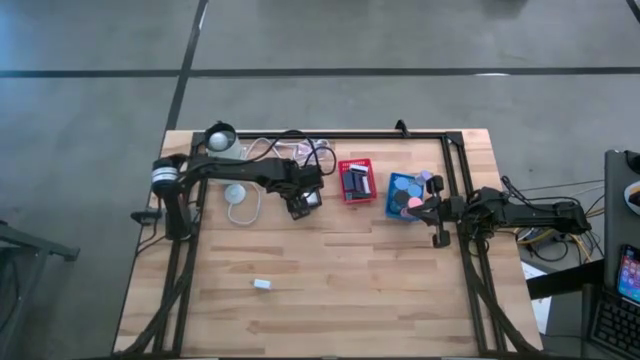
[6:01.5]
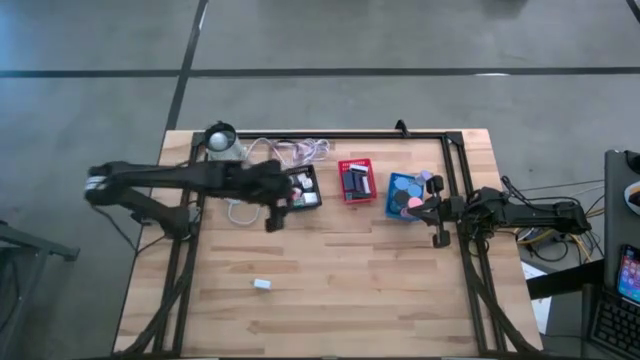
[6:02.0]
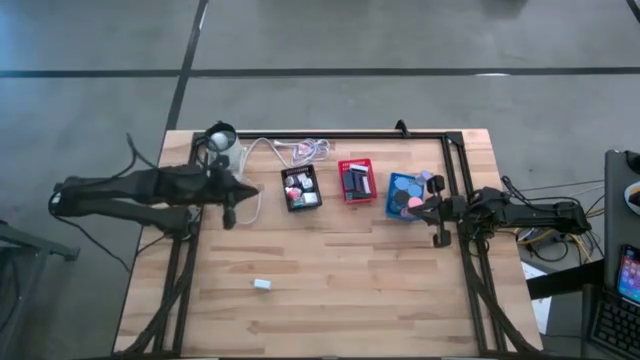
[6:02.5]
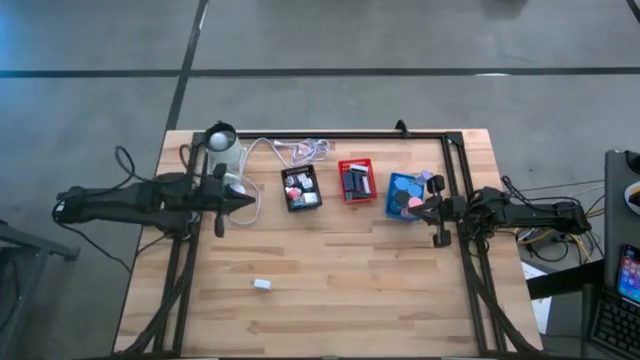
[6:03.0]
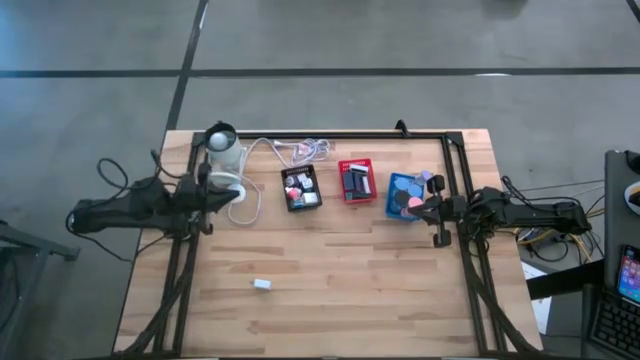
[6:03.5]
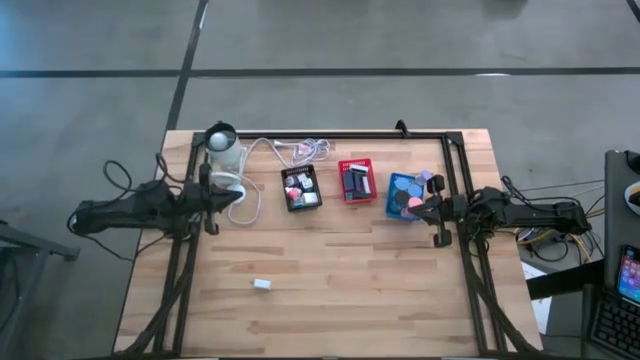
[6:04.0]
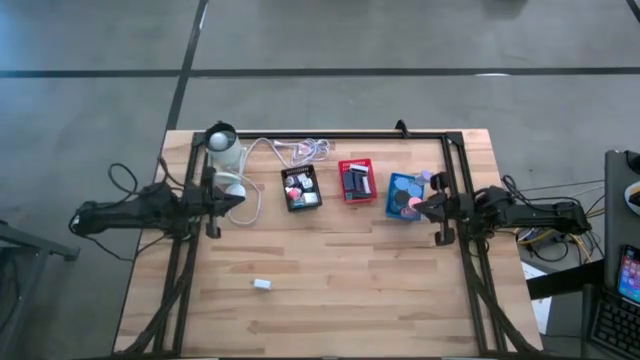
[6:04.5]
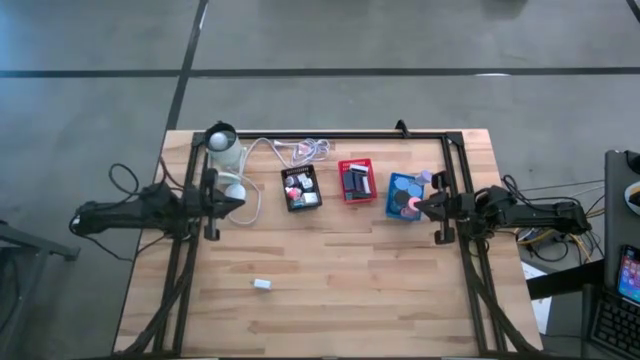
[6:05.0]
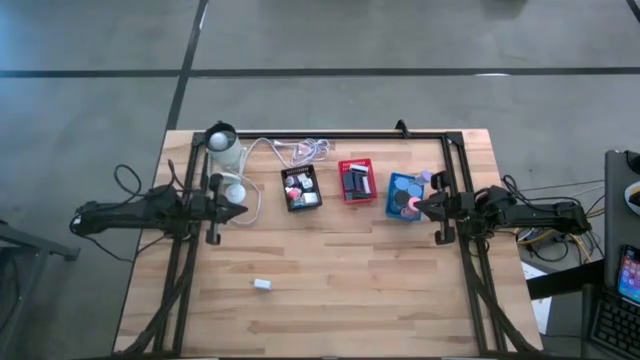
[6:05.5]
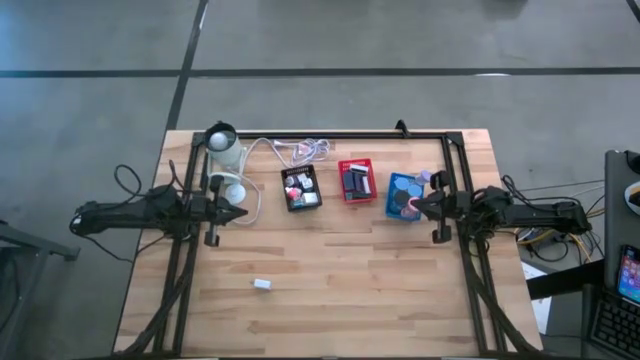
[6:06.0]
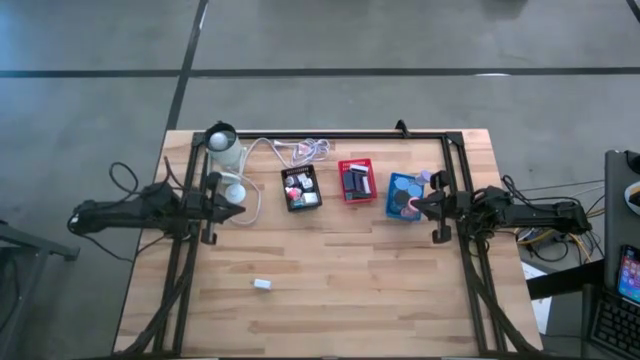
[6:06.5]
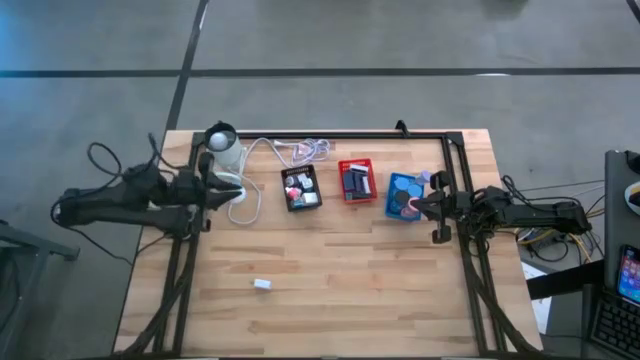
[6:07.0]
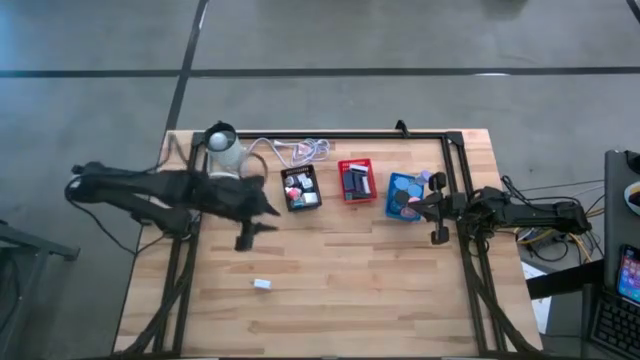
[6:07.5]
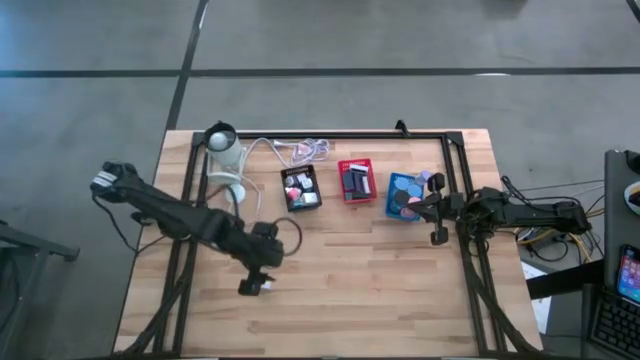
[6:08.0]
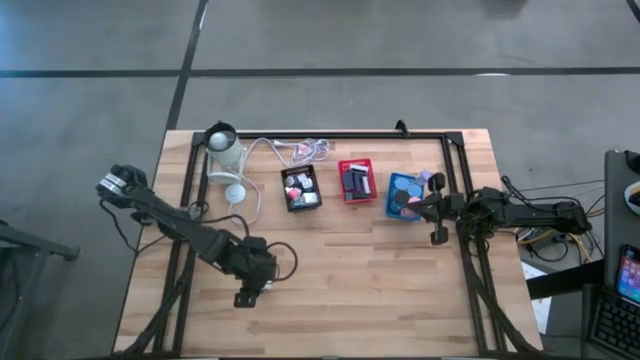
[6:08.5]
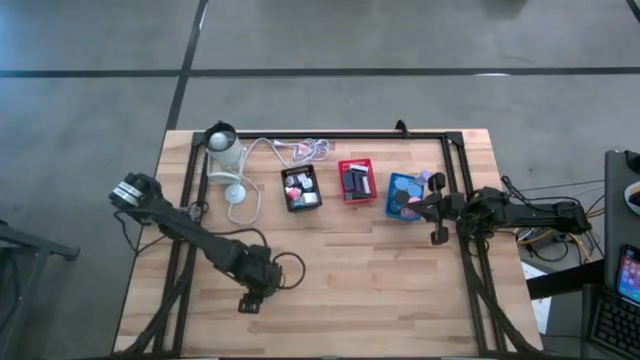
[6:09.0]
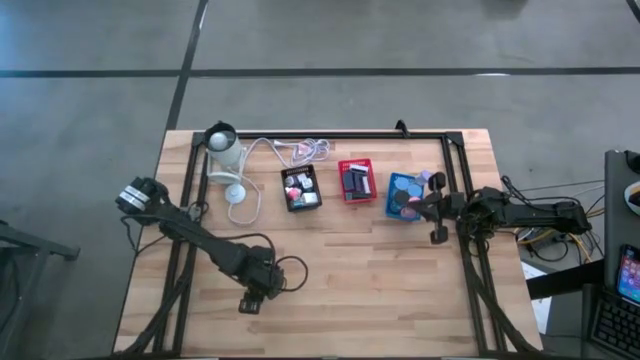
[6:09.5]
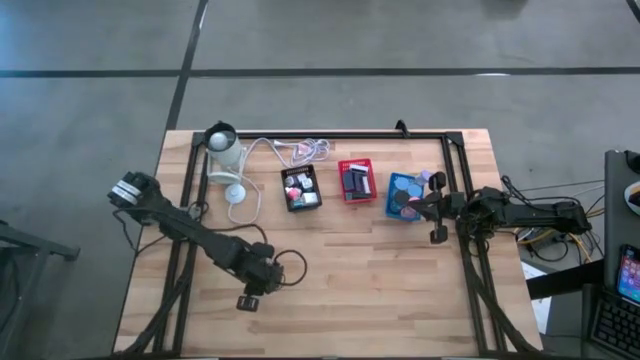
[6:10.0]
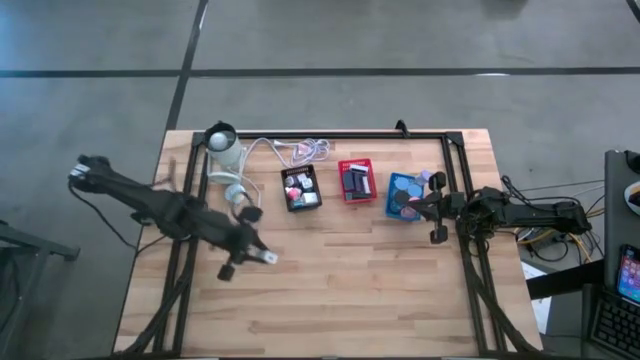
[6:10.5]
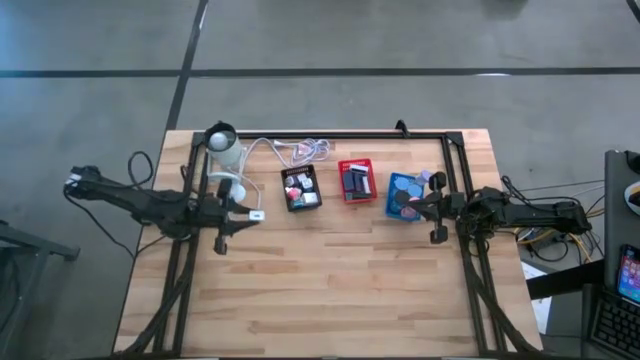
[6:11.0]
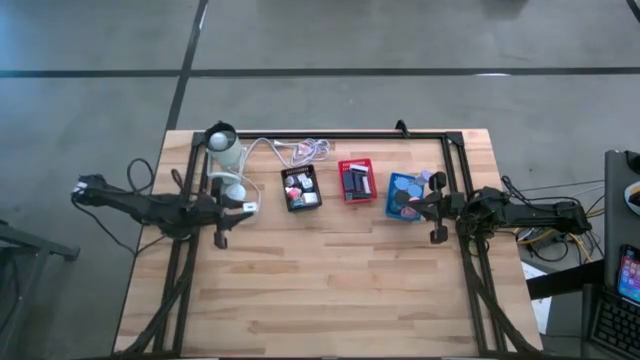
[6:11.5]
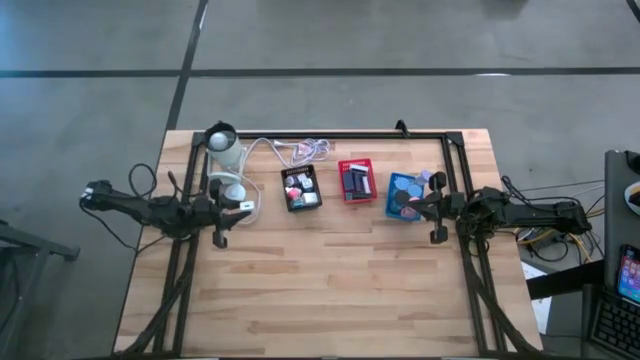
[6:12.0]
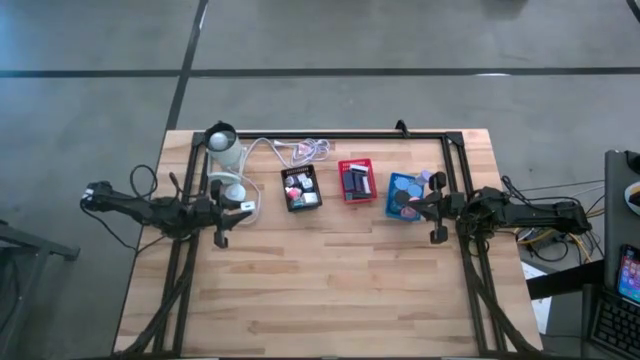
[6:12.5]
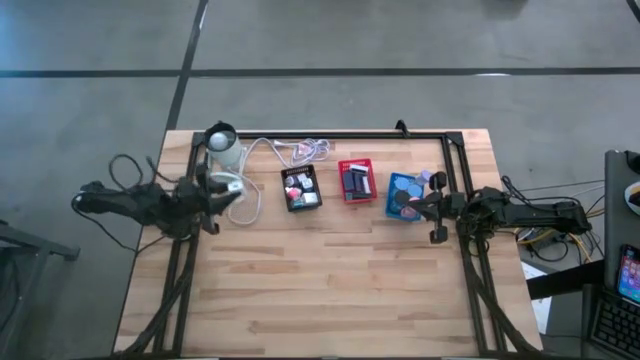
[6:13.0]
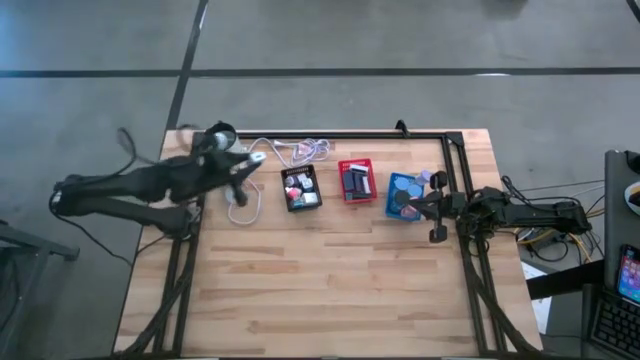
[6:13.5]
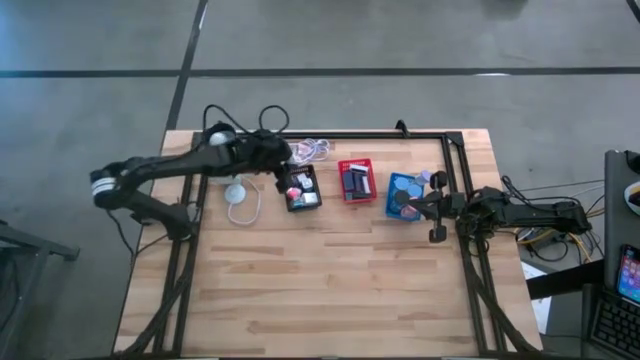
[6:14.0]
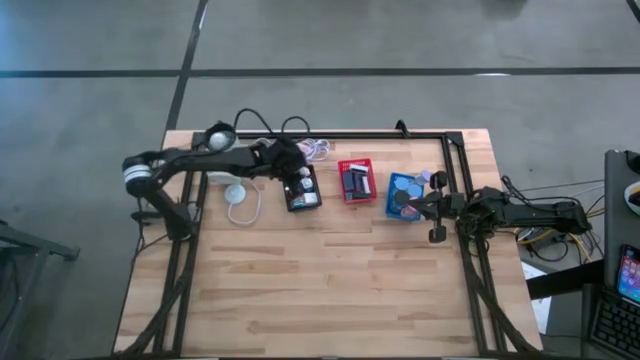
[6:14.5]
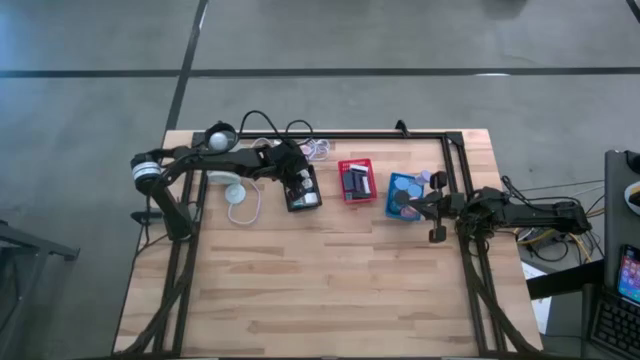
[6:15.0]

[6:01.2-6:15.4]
Task: Pick & Place Office items
Put the white charger adapter into the black bin

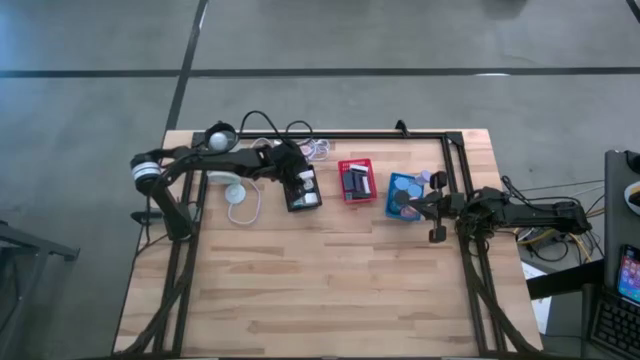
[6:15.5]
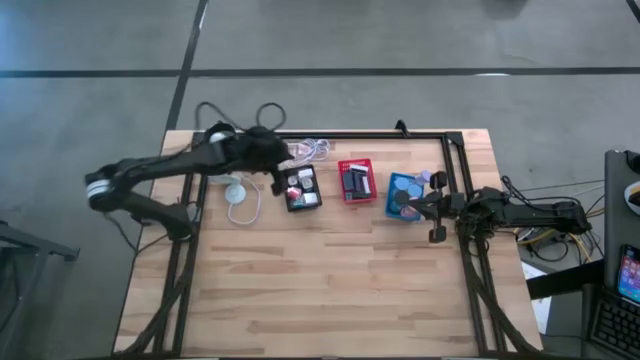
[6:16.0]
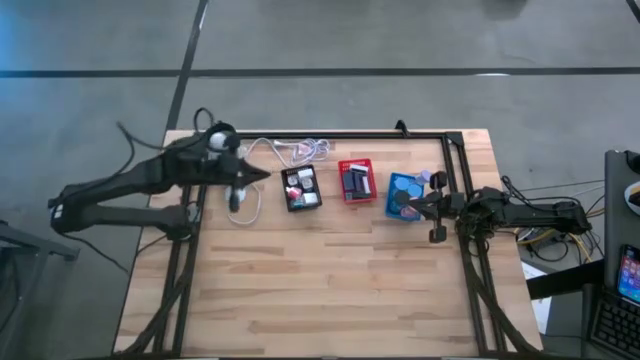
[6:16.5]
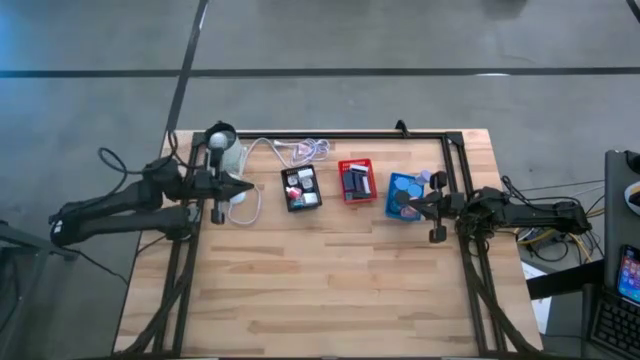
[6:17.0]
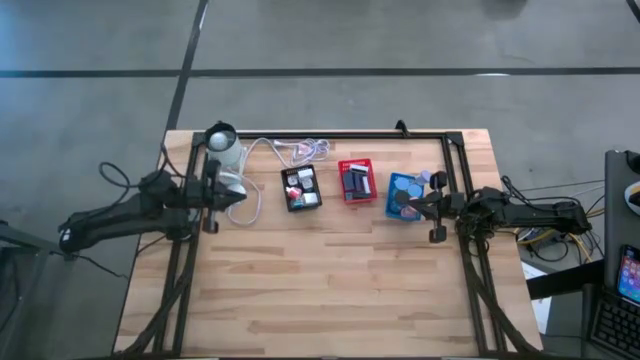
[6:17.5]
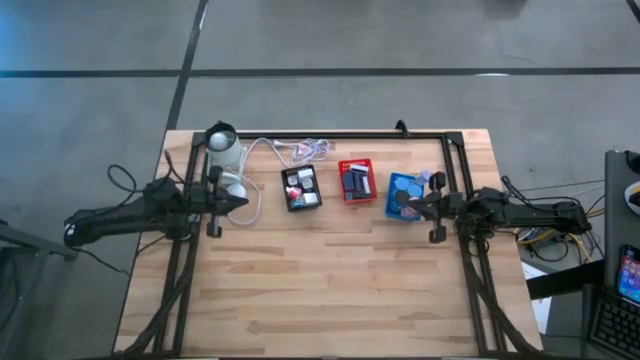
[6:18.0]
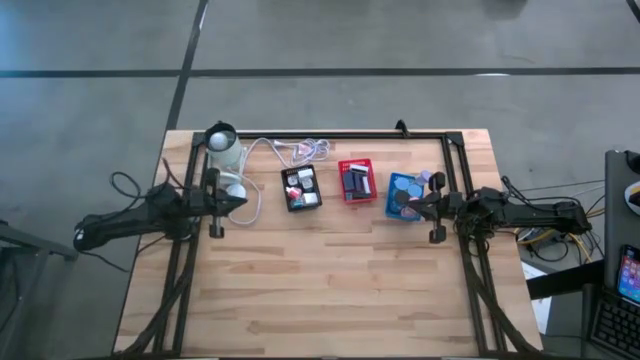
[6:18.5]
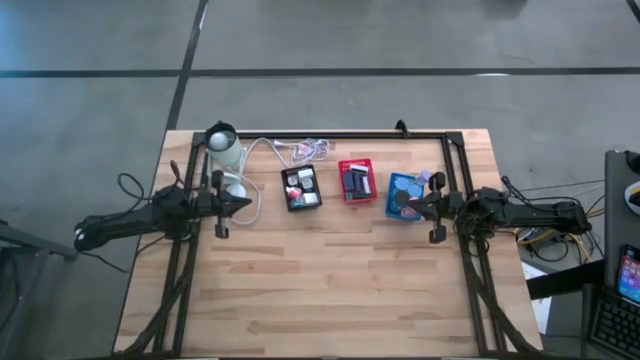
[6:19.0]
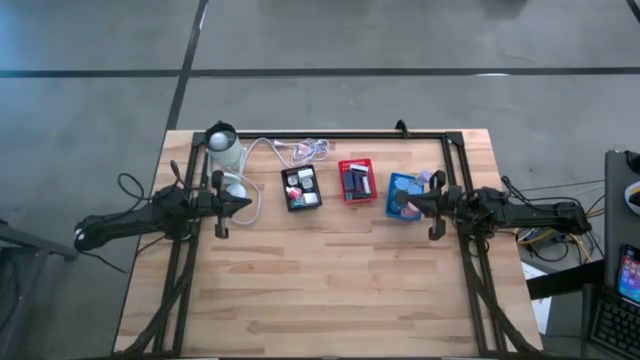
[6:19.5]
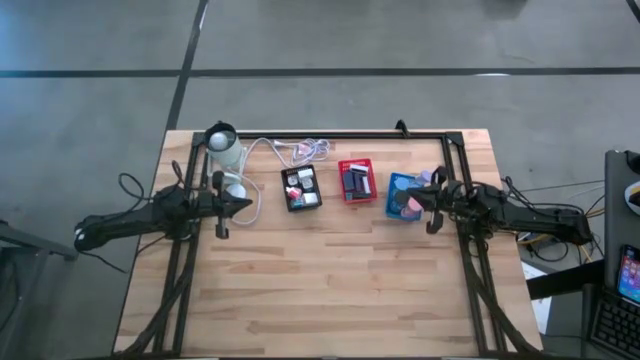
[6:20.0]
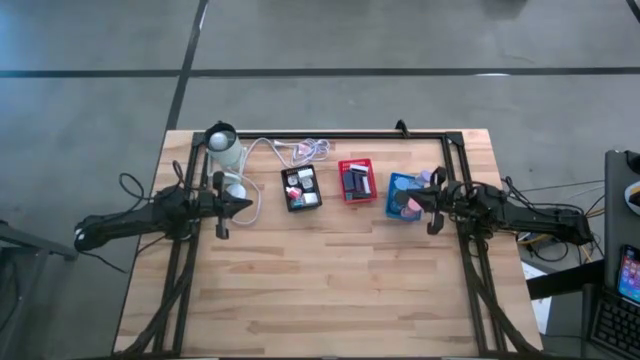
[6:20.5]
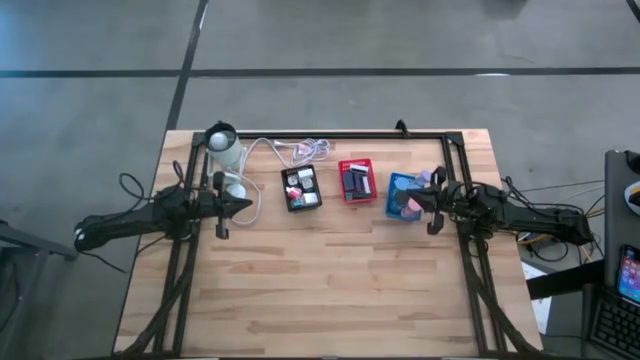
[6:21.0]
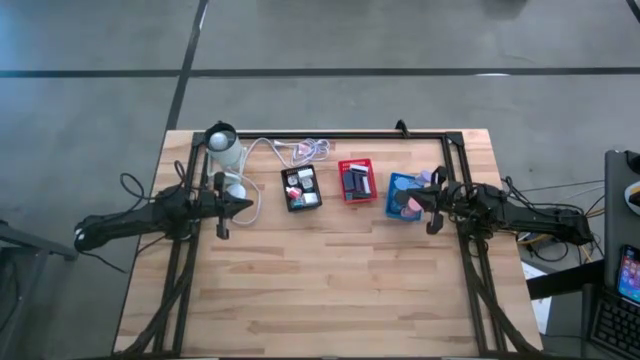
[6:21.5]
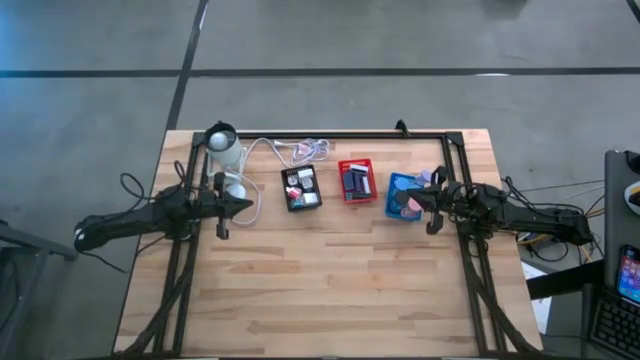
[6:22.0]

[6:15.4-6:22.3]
Return to Home Position

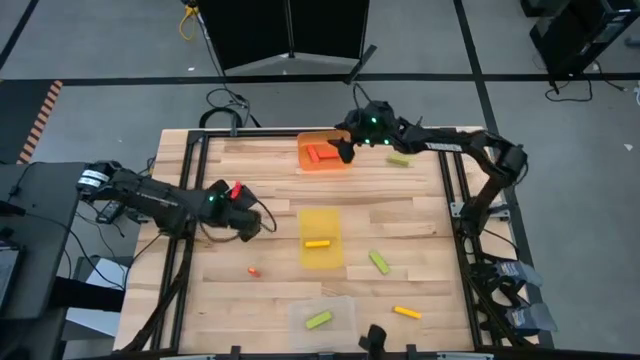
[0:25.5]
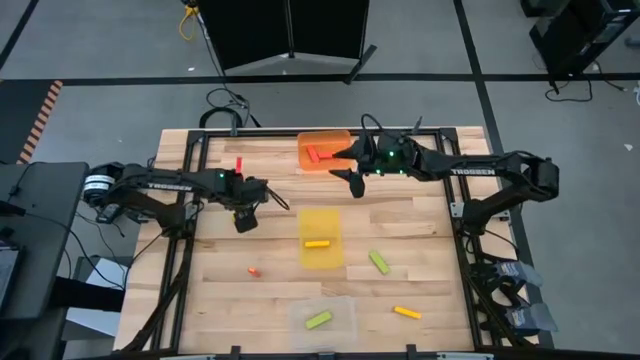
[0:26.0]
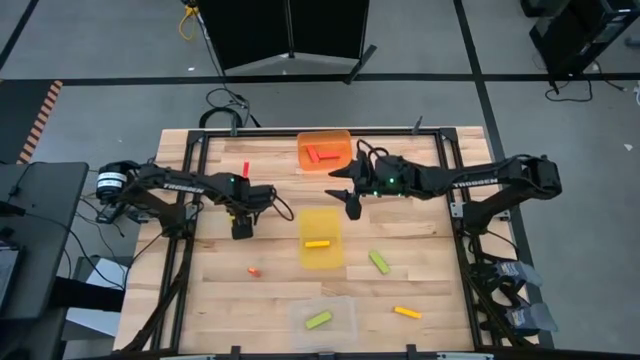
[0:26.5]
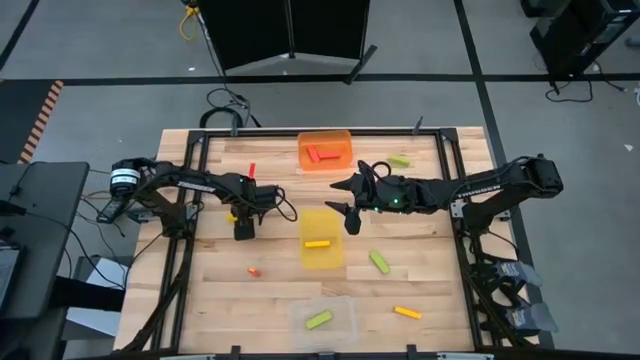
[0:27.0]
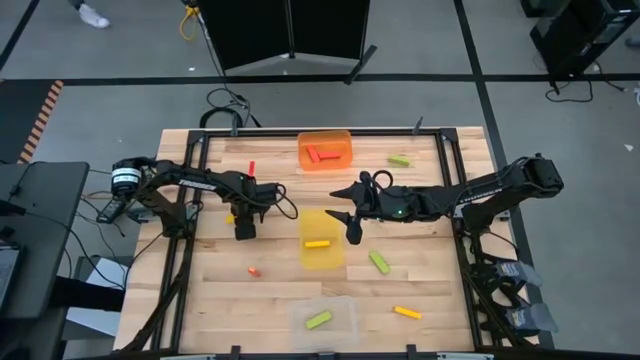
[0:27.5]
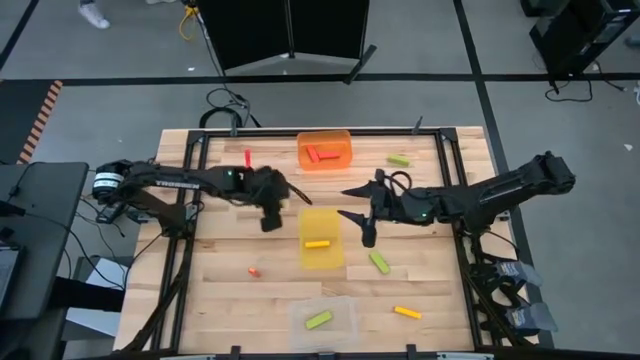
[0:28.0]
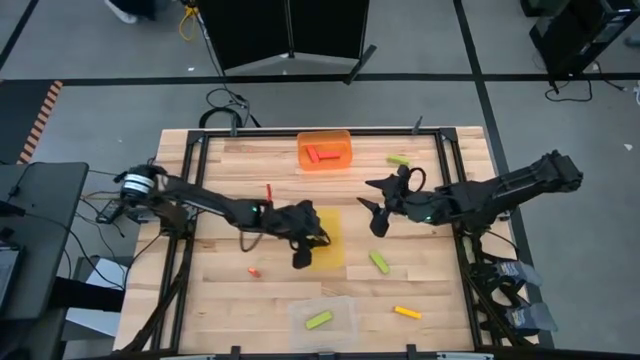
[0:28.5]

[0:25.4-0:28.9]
Task: Sort blocks
Put the top yellow block into the yellow bin
